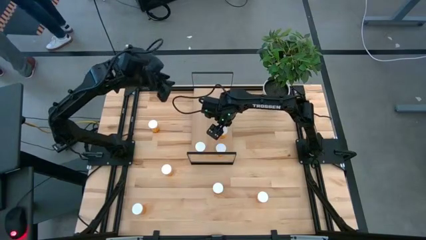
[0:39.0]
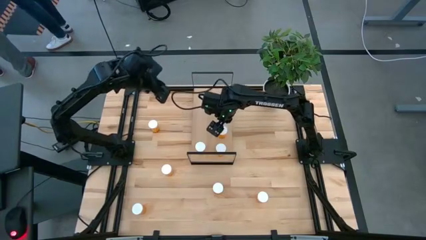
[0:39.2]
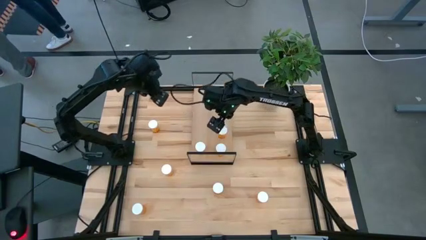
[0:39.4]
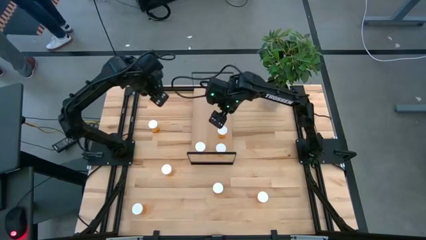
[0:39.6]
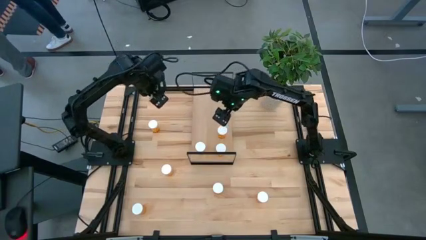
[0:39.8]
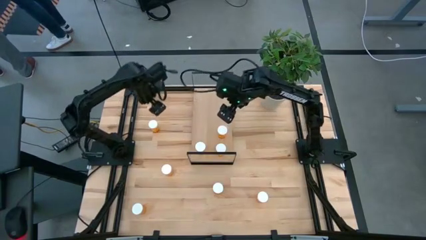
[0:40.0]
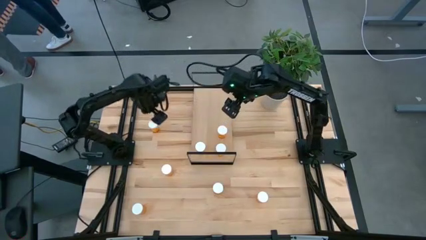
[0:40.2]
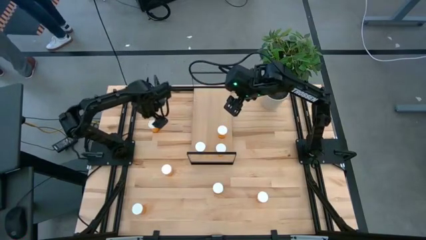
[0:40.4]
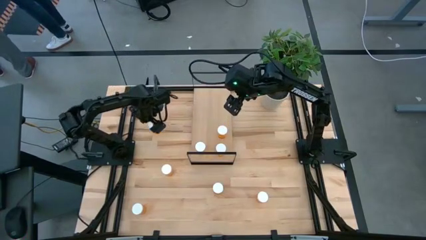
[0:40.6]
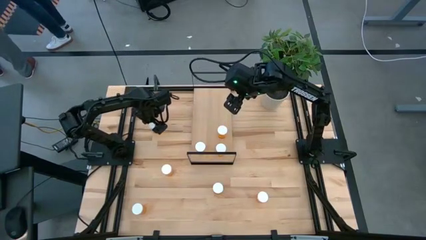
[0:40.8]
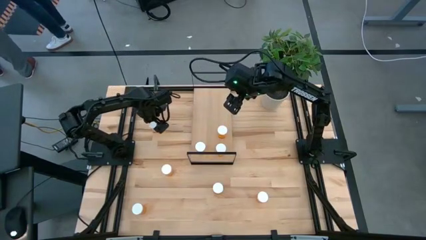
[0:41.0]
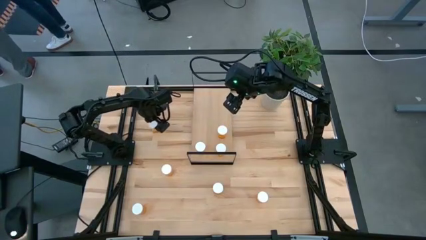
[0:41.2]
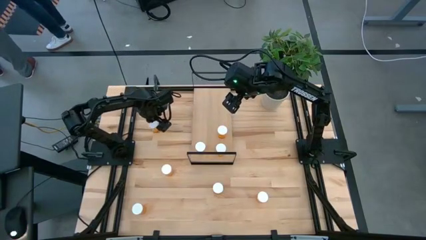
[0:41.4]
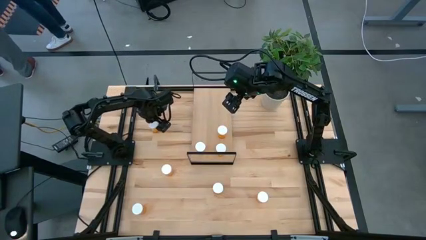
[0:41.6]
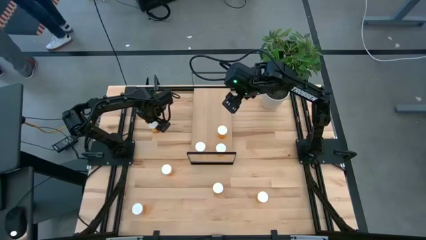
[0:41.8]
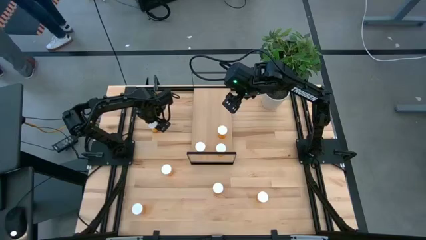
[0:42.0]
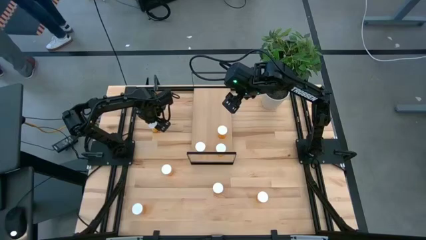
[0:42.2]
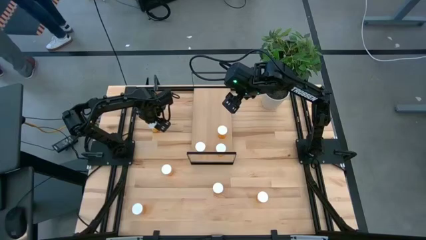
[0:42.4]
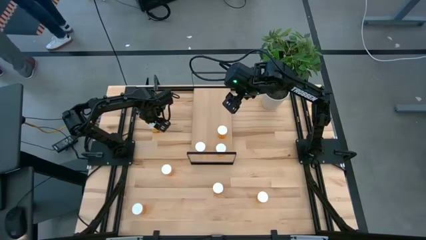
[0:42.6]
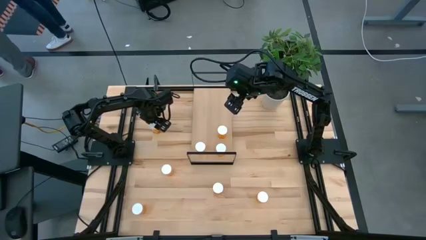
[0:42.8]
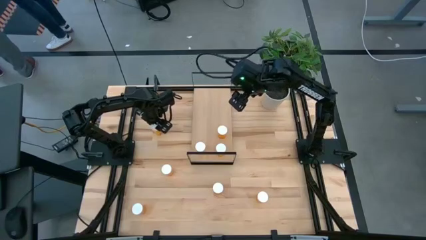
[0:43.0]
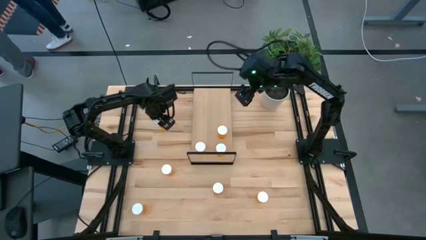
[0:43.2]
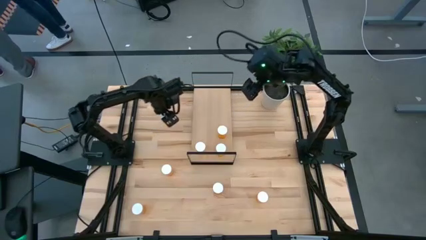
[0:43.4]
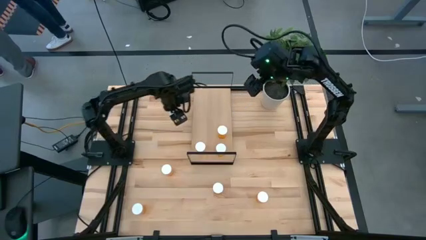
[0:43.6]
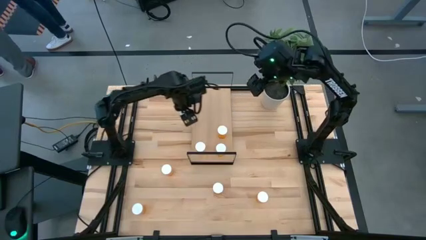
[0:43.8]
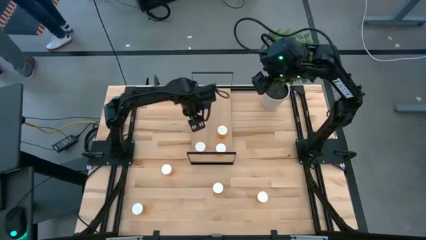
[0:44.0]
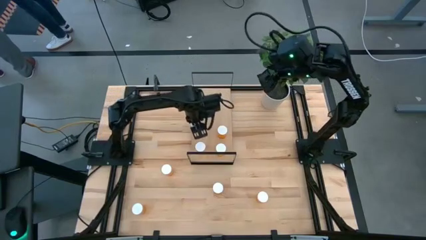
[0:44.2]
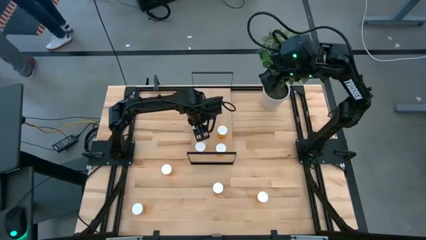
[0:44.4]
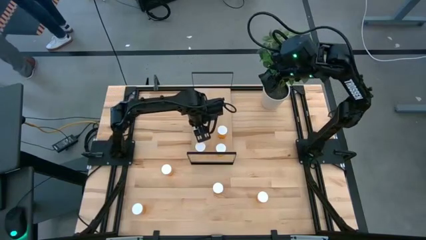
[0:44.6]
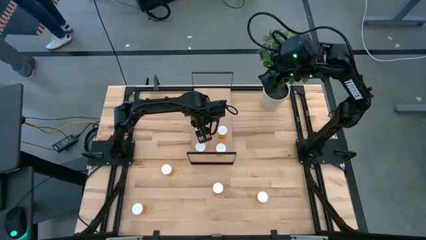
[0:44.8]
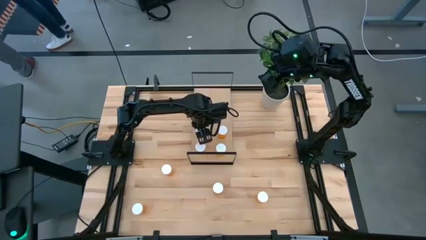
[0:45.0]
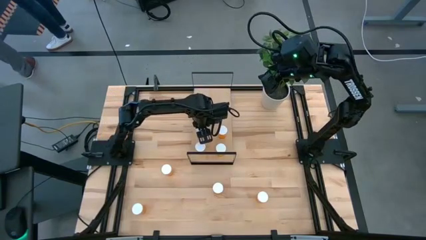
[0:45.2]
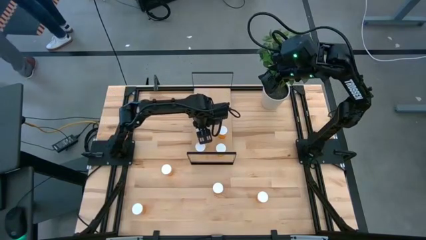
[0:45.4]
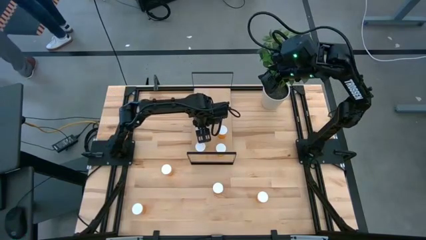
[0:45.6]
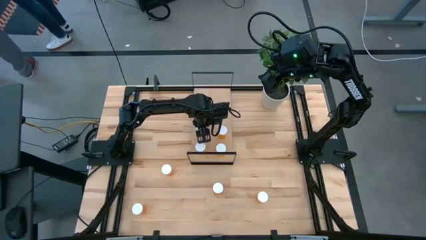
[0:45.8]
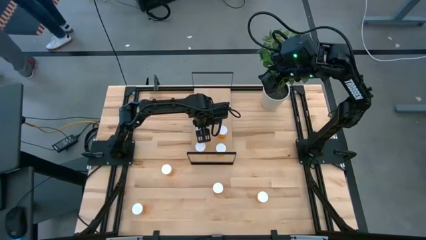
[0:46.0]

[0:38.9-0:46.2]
Task: Pick and place medicine bottles onto shelf by color
Put the orange pill bottle on the shelf aligned with the other orange pill bottles

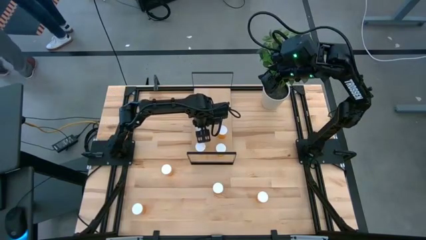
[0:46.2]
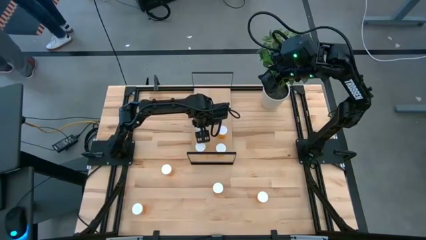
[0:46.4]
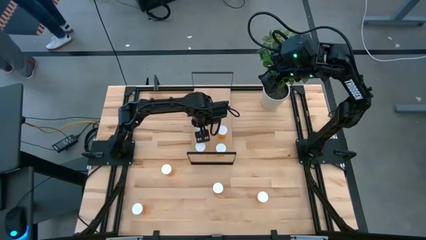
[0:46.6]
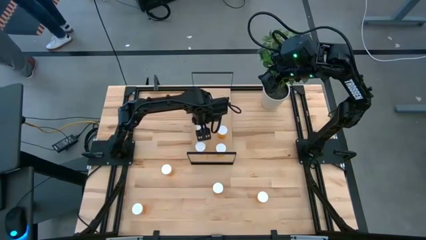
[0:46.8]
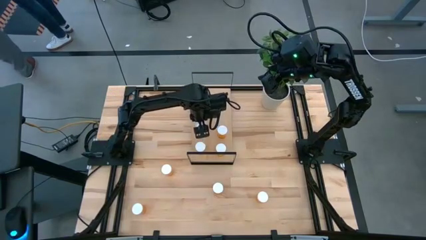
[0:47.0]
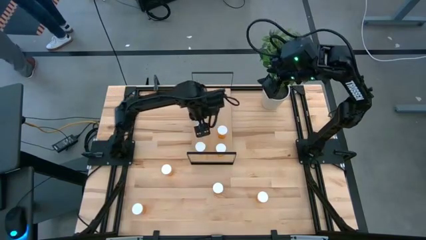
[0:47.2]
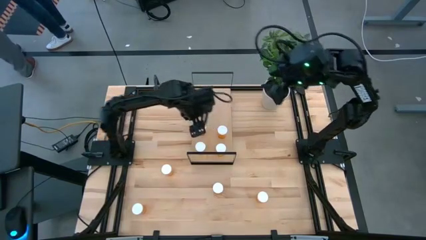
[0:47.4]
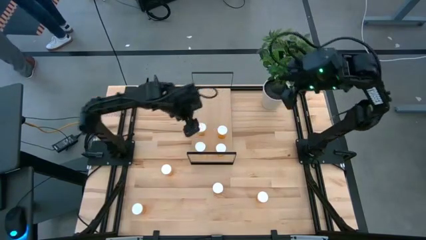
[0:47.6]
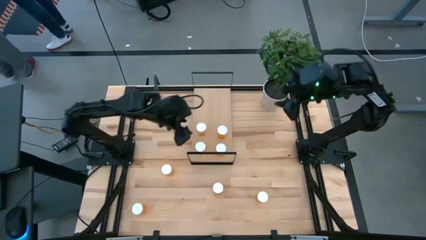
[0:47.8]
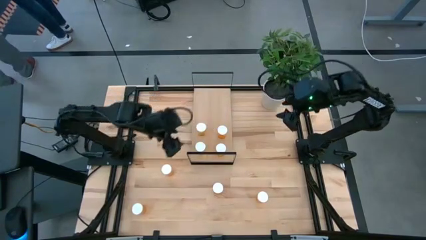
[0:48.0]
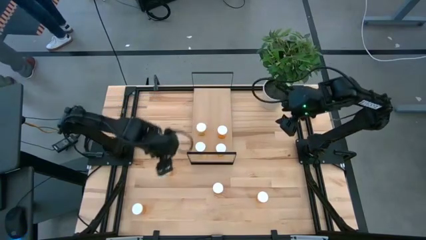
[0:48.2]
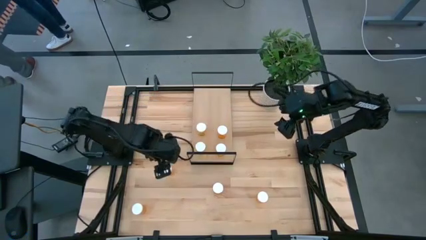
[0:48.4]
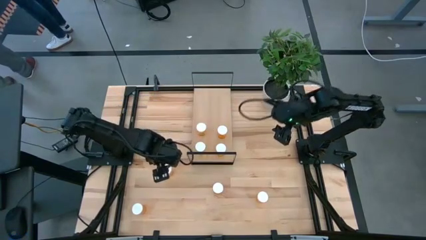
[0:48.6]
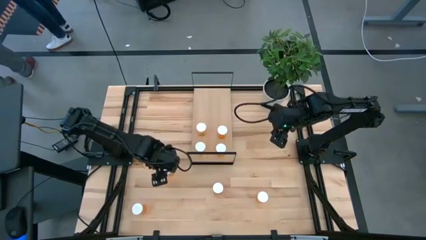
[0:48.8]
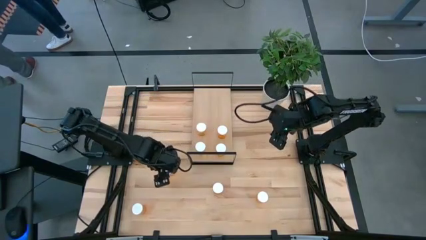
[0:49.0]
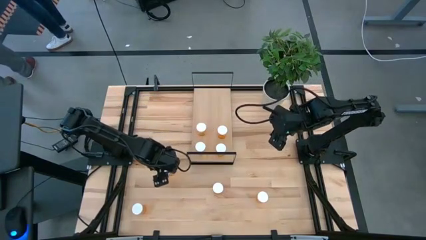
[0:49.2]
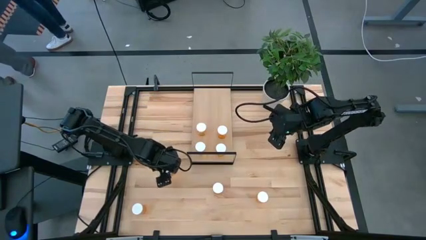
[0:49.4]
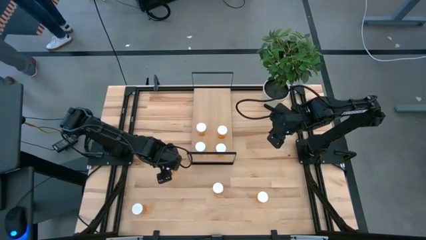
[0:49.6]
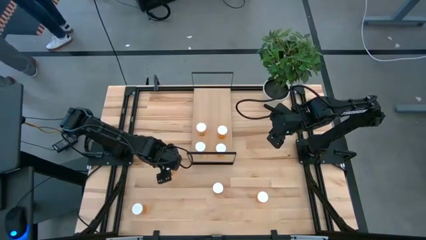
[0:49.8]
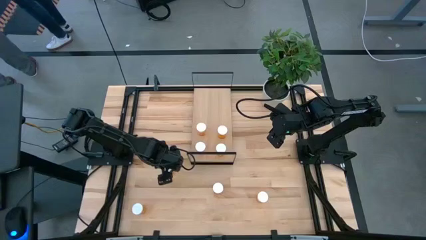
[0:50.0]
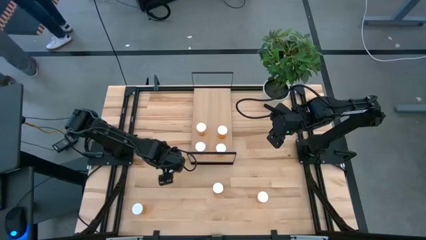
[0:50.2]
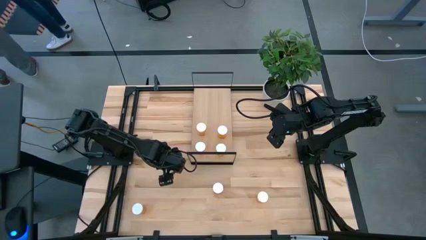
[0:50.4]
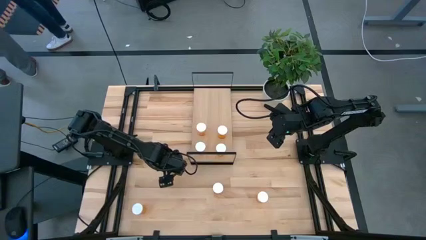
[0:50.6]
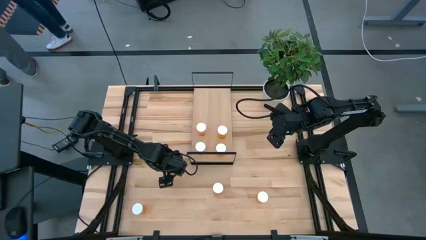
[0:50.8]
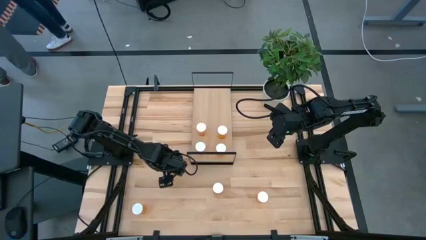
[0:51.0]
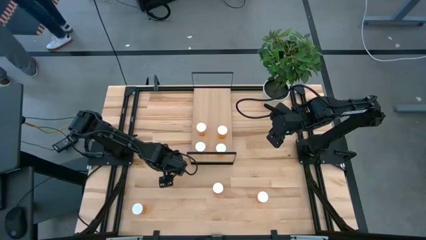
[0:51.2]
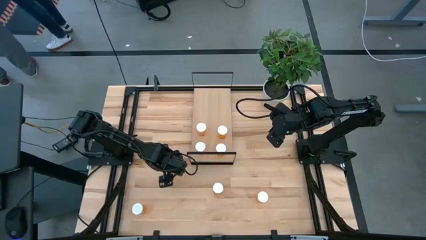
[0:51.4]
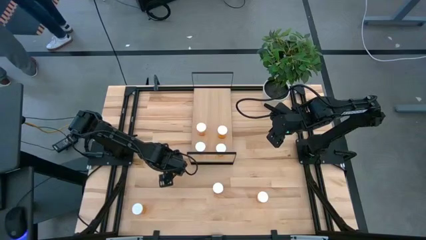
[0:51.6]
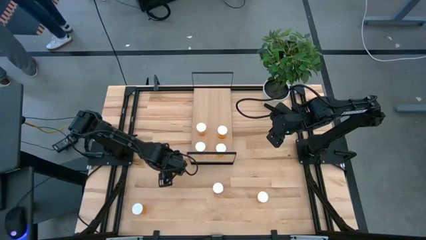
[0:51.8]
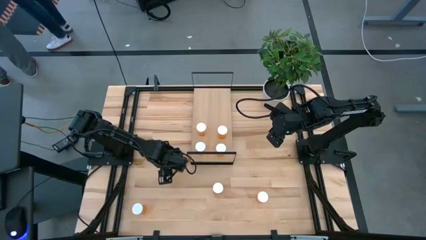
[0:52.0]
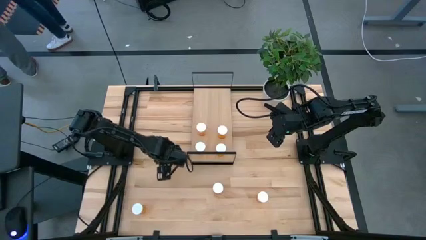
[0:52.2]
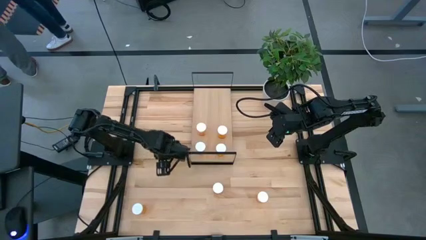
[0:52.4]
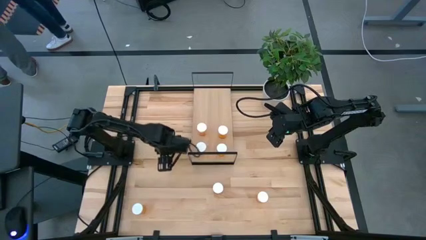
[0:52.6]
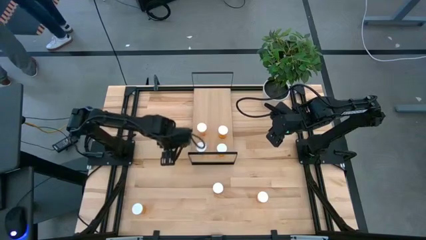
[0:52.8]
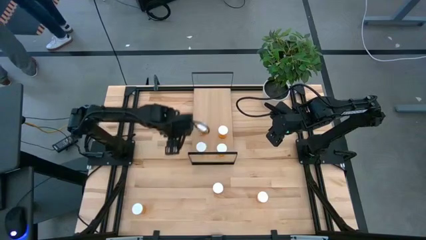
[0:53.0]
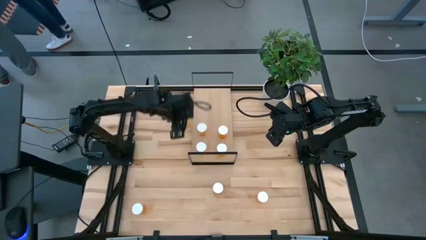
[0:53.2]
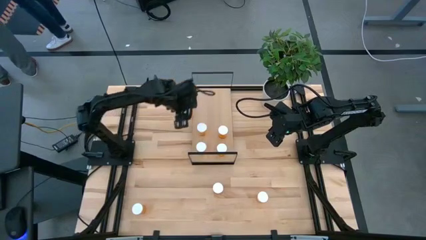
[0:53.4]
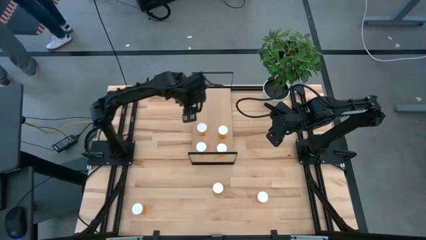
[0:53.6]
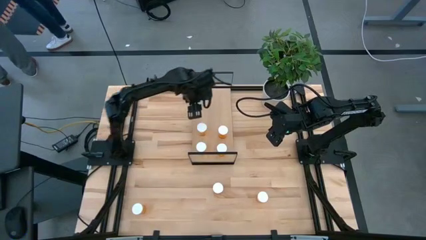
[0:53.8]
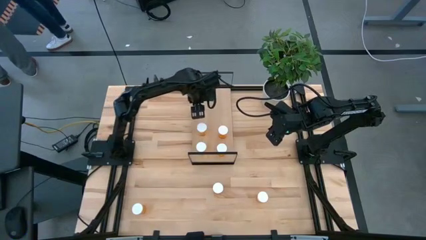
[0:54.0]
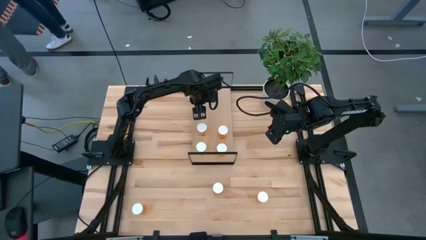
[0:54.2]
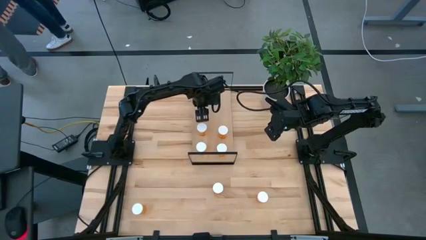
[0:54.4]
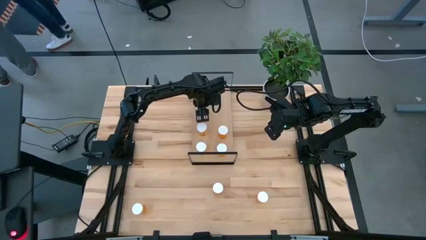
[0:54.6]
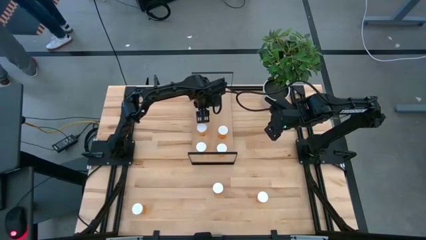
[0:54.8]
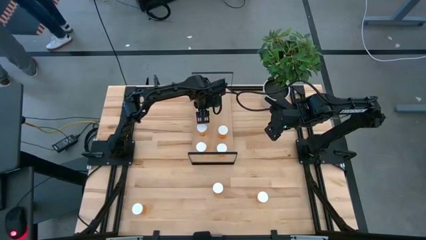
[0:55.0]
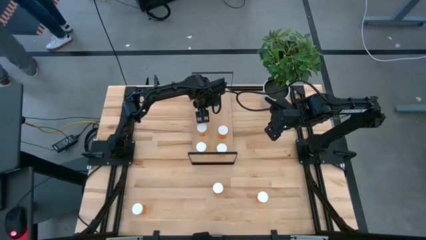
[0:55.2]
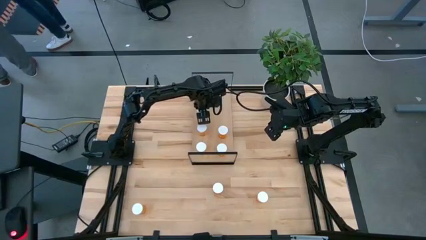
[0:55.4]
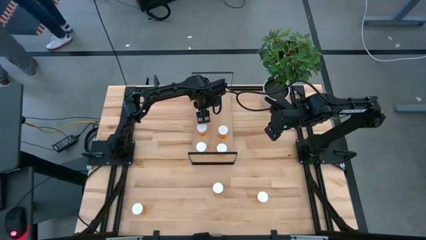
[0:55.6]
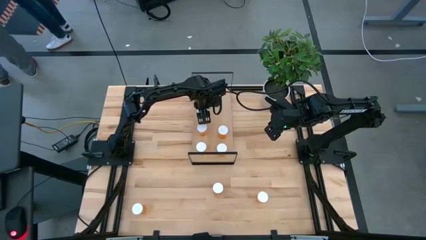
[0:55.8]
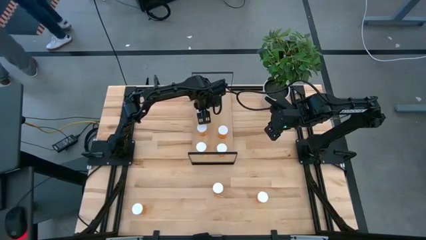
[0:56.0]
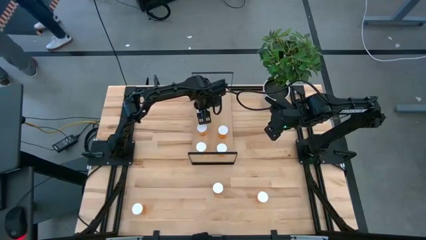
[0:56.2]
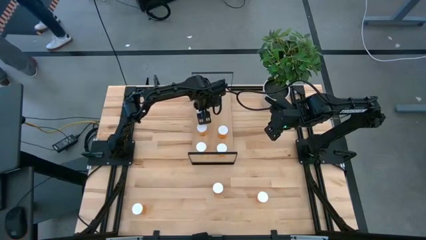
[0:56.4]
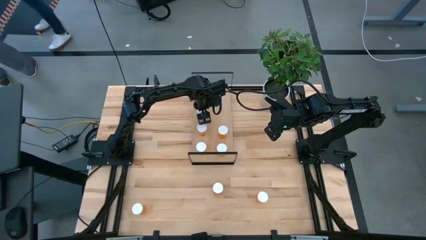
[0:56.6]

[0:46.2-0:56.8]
Put the orange pill bottle on the shelf aligned with the other orange pill bottles
